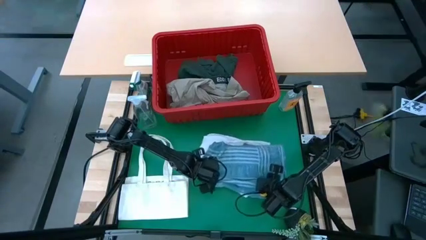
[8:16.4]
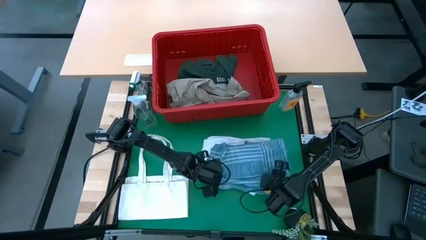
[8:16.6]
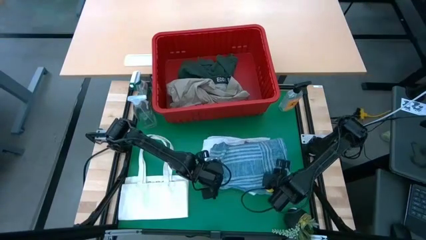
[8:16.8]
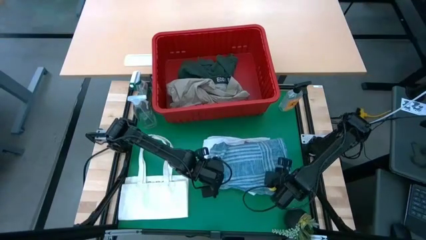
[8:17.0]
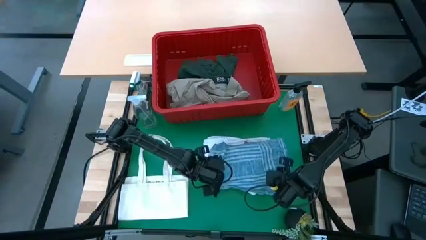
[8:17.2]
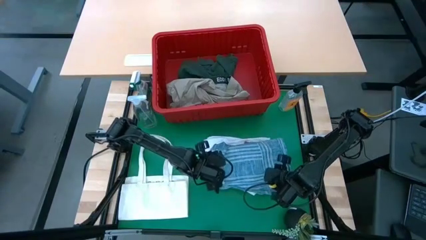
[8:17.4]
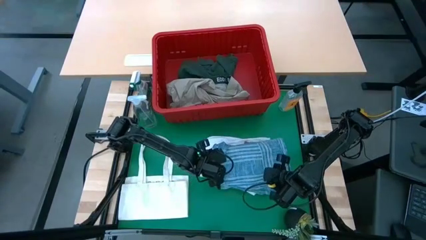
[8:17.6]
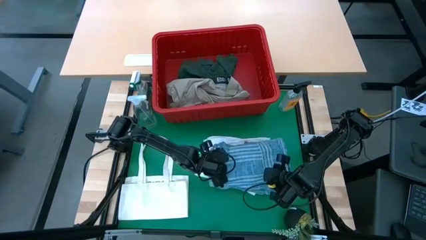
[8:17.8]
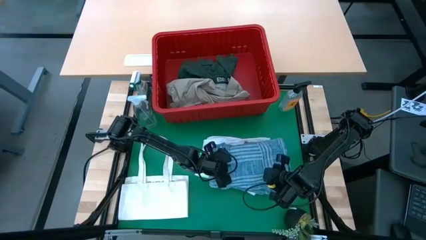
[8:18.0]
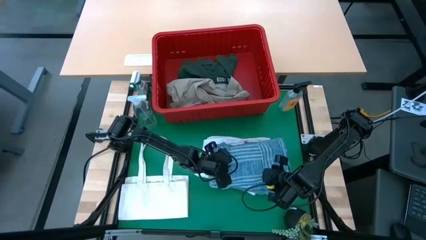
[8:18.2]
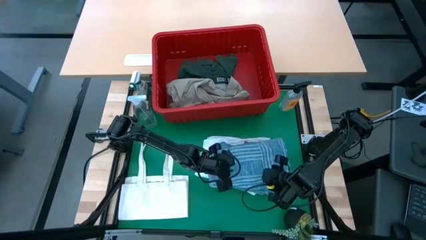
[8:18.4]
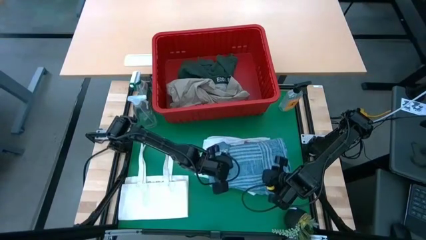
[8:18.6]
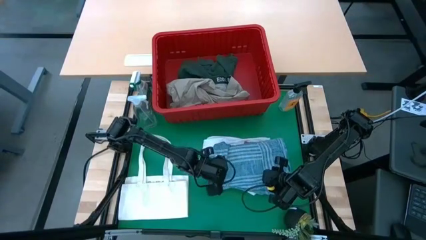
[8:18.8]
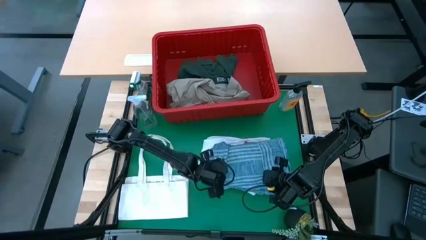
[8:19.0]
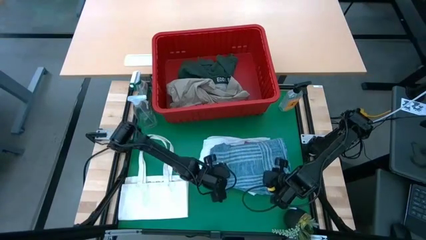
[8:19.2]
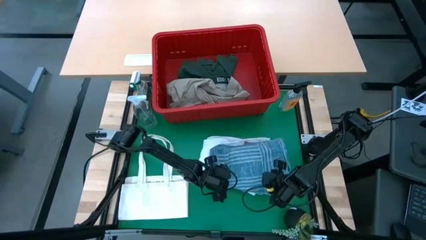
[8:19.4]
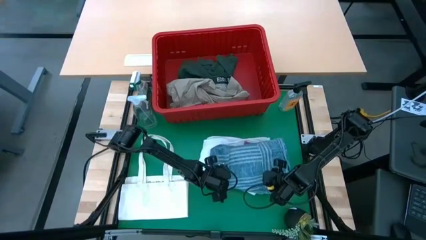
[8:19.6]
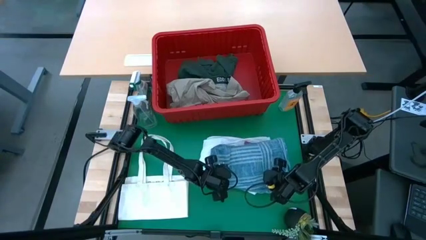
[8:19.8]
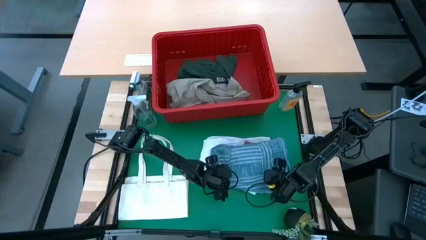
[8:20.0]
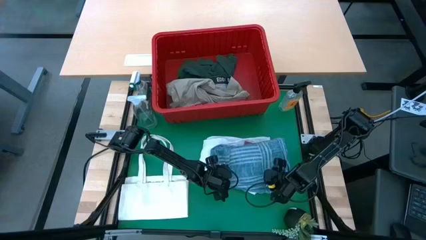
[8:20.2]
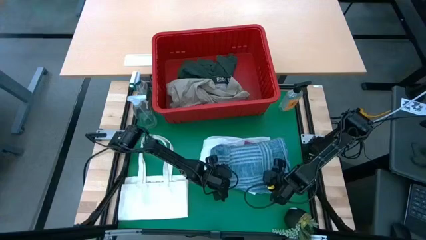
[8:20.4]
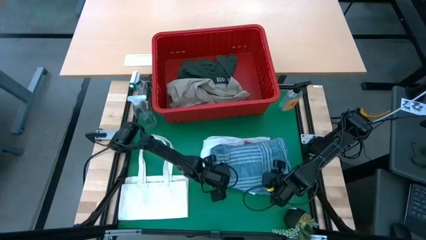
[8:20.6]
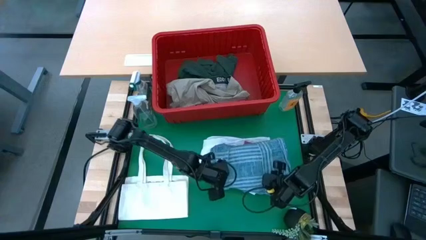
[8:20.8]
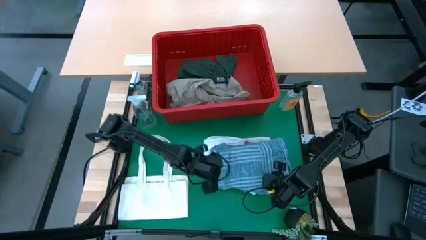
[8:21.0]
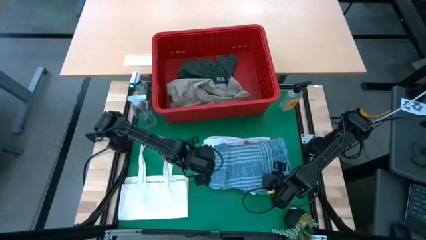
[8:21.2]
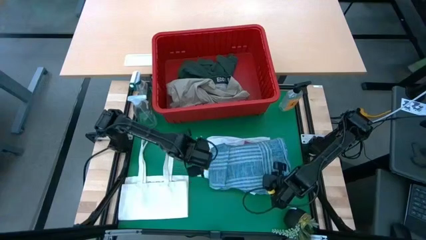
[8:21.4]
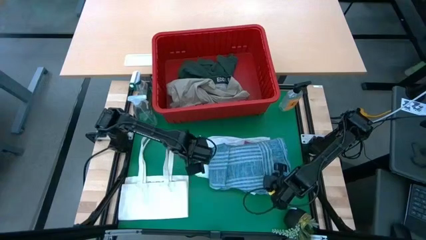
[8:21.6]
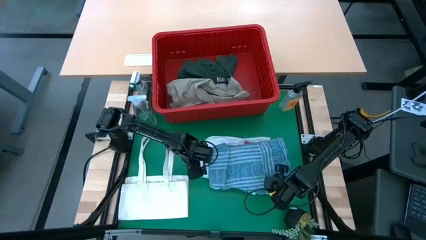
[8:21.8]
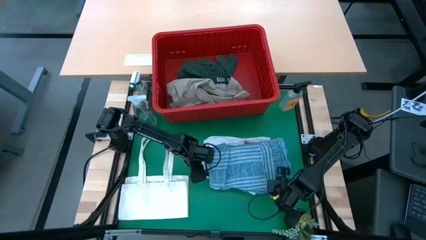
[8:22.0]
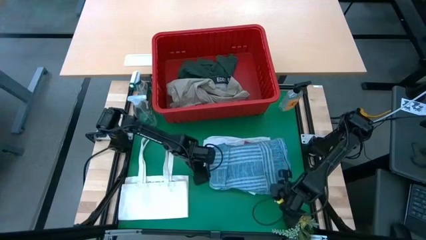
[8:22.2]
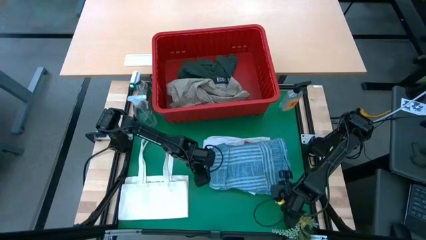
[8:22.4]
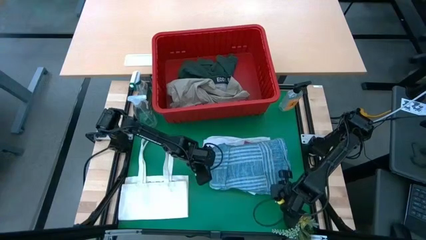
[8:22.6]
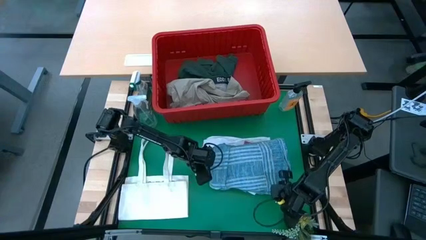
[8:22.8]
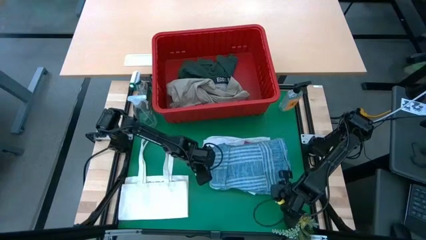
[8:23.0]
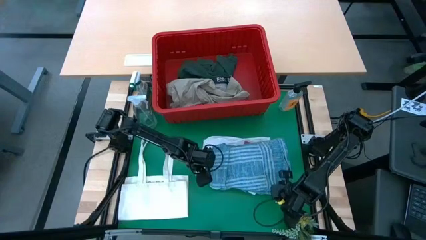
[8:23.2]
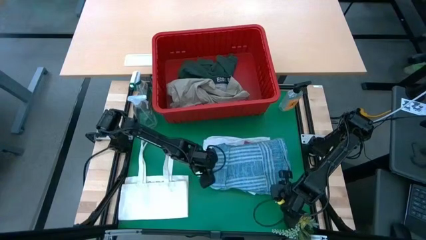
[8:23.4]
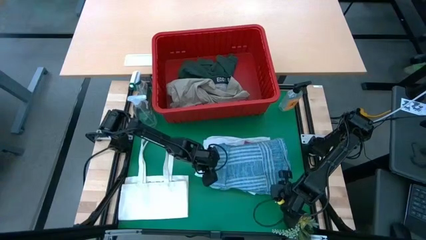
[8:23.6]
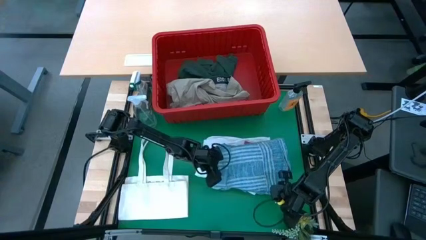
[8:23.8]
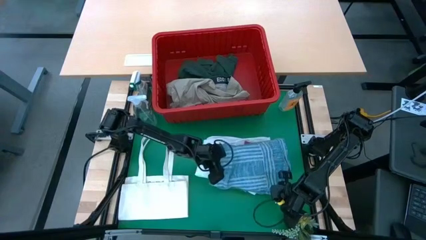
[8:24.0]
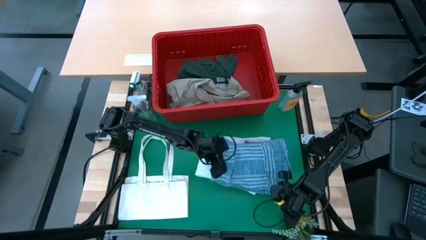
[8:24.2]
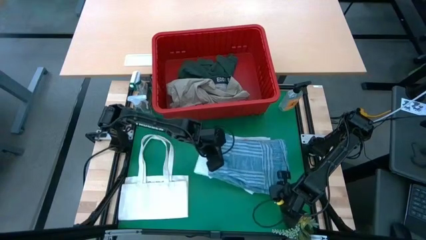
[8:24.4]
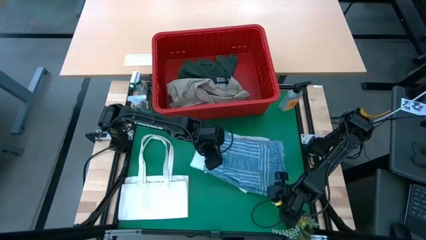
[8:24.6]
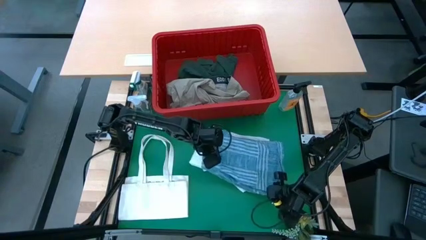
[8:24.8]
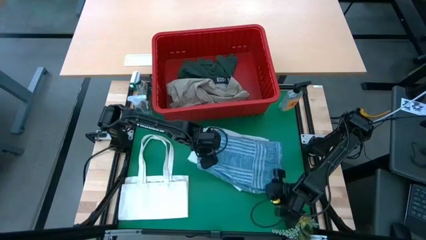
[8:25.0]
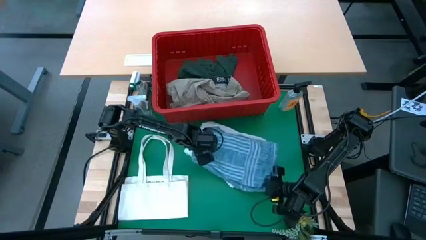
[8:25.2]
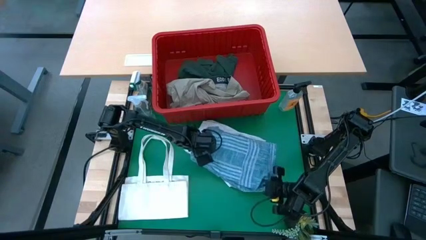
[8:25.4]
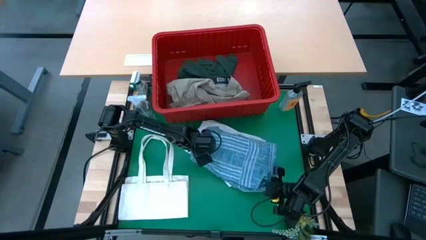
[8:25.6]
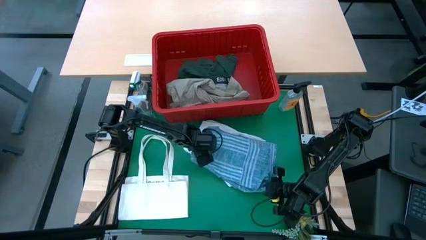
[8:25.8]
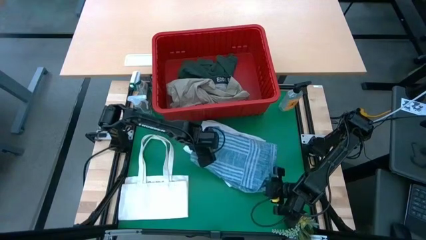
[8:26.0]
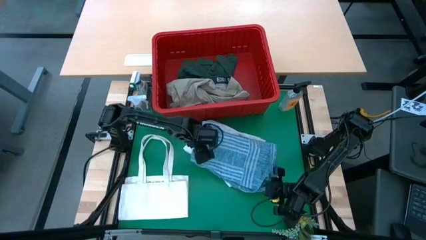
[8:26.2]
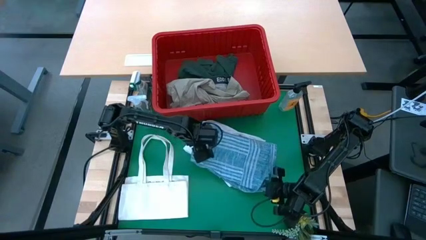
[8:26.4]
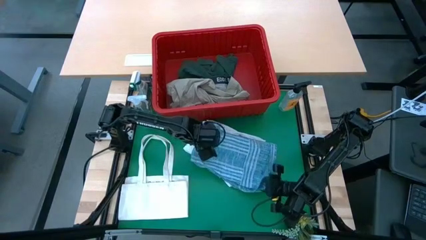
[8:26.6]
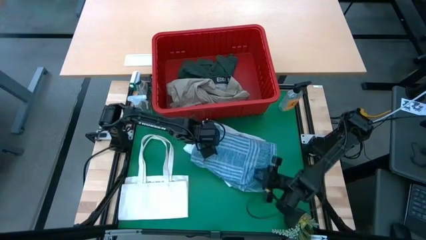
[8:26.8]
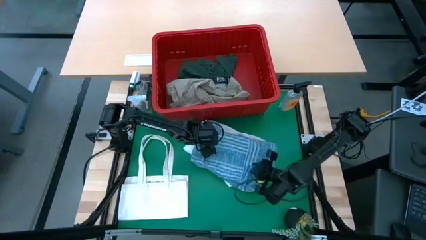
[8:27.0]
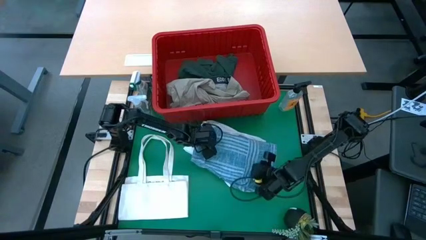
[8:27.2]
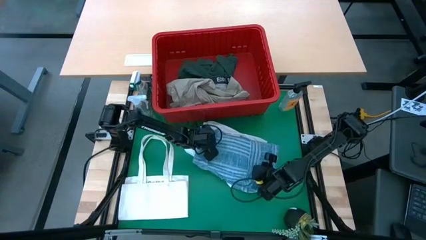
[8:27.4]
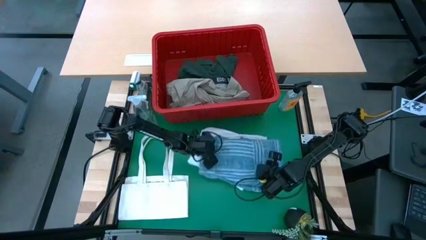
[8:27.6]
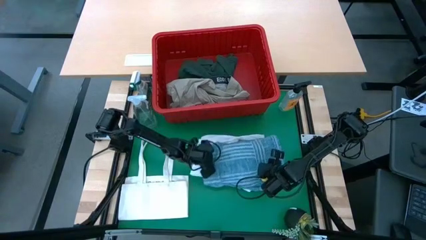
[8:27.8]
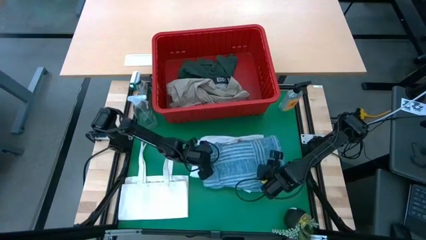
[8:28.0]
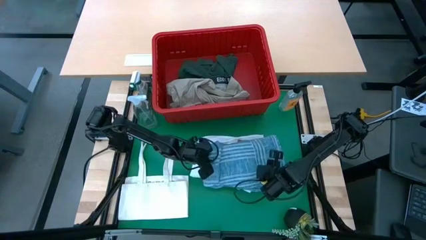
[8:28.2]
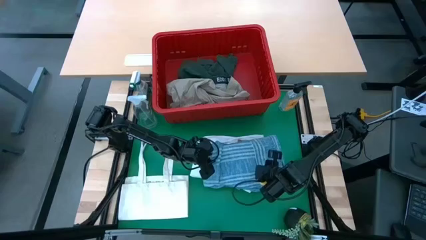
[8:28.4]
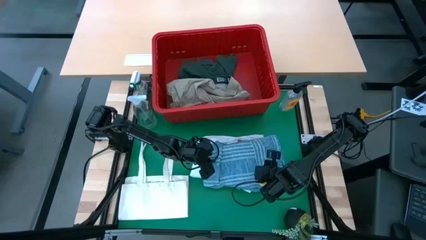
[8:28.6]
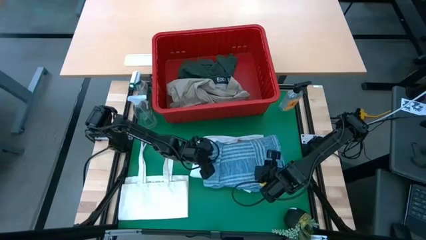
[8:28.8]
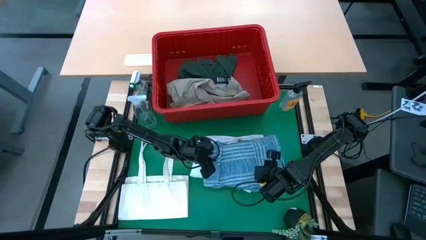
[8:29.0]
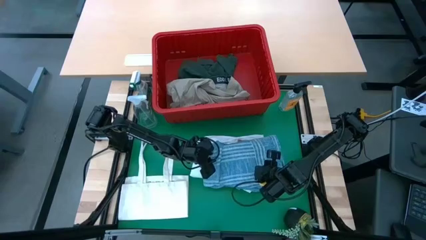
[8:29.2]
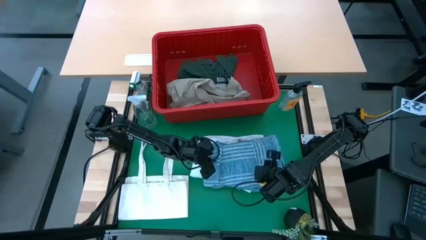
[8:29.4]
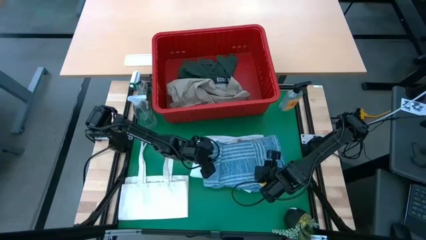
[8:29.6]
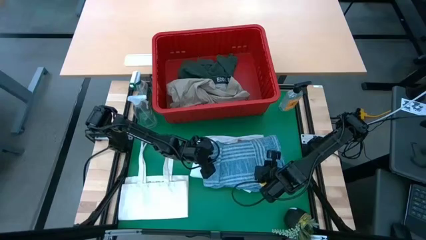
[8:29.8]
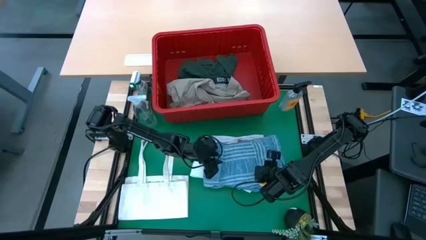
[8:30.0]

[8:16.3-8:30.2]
Task: Fold Laundry from Bin
Stack the blue checkered polo shirt on top of the folded white underwear
